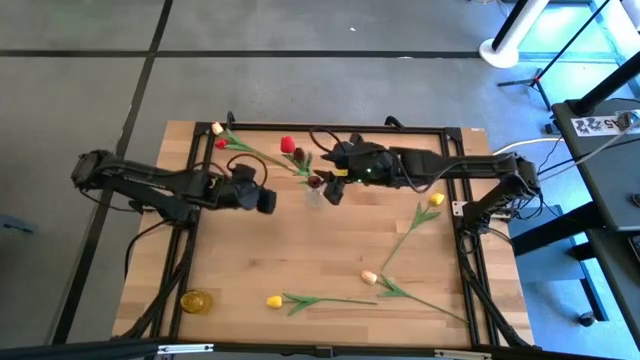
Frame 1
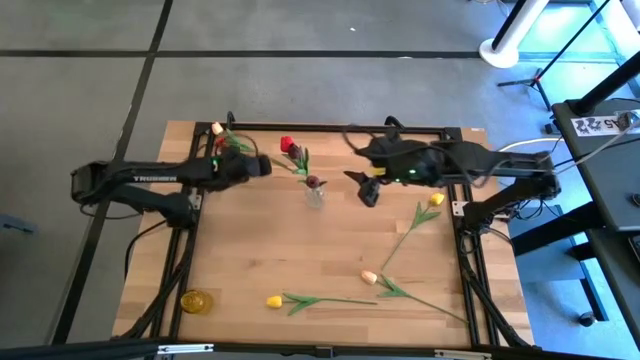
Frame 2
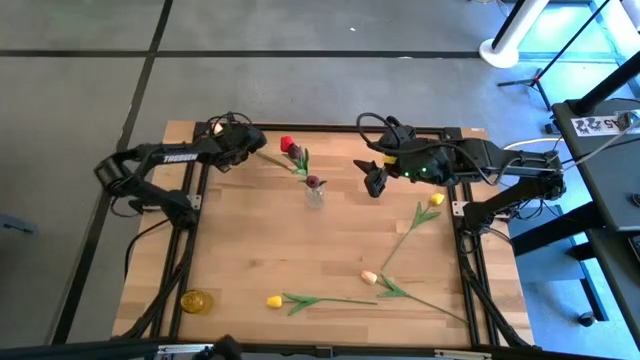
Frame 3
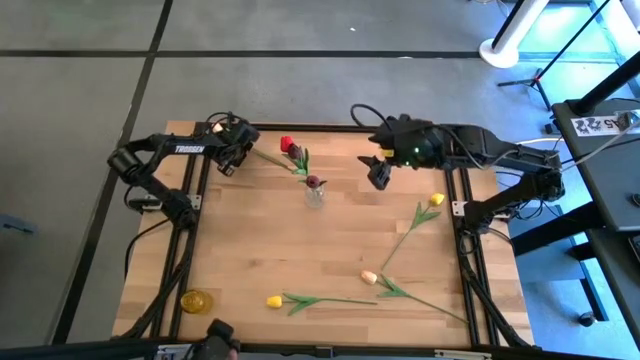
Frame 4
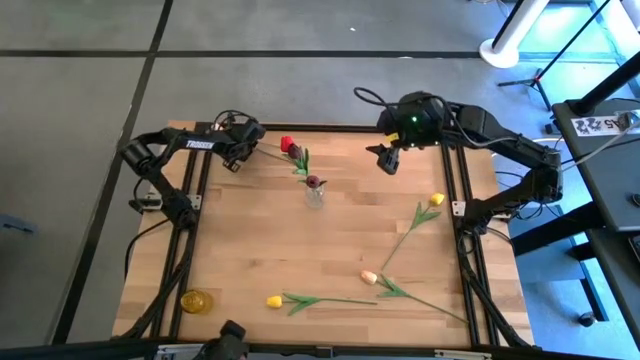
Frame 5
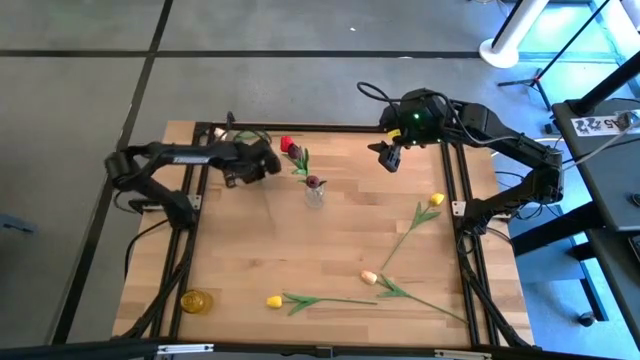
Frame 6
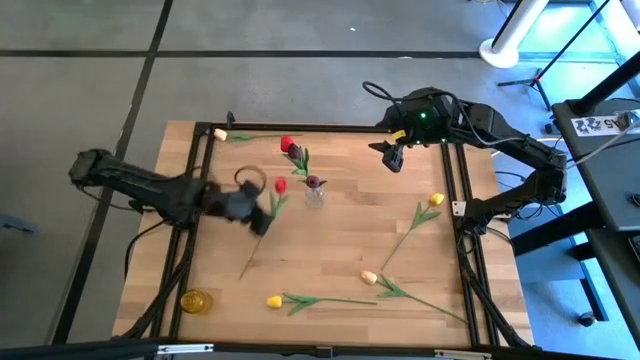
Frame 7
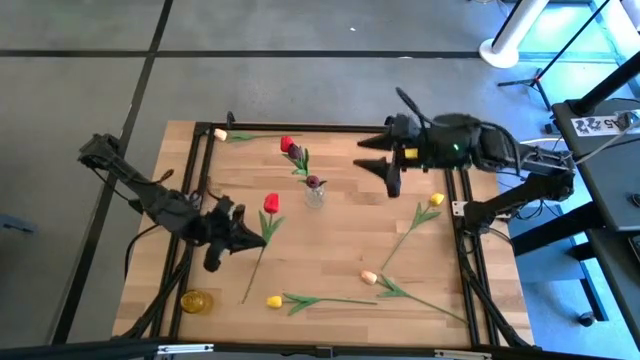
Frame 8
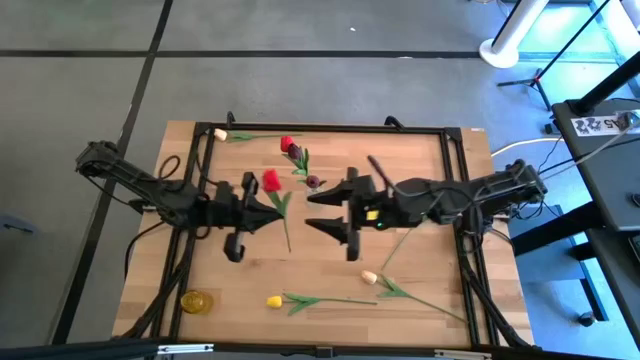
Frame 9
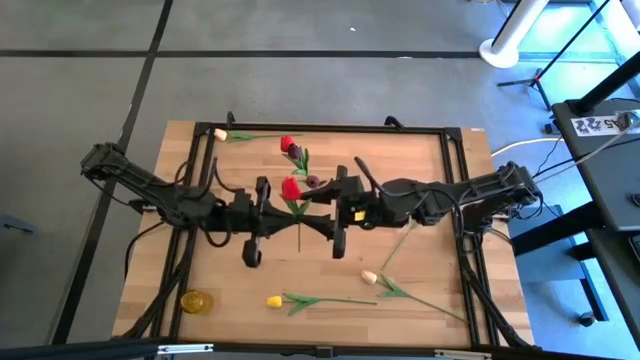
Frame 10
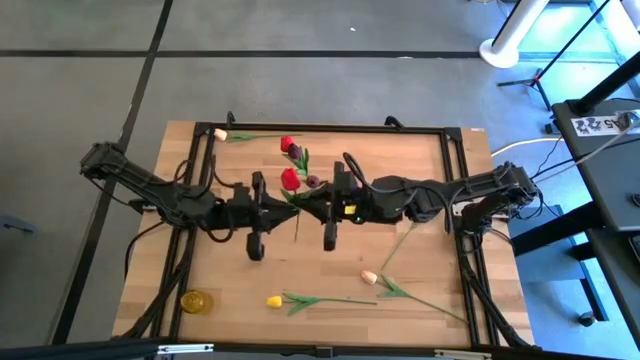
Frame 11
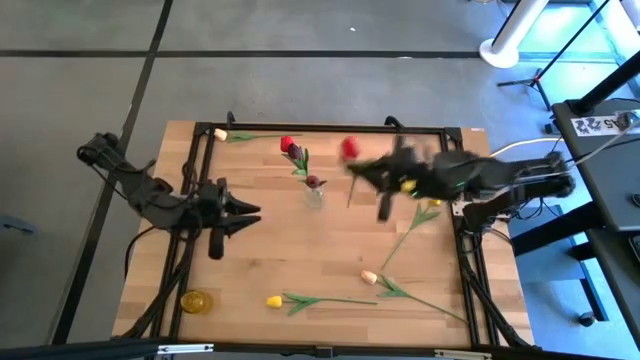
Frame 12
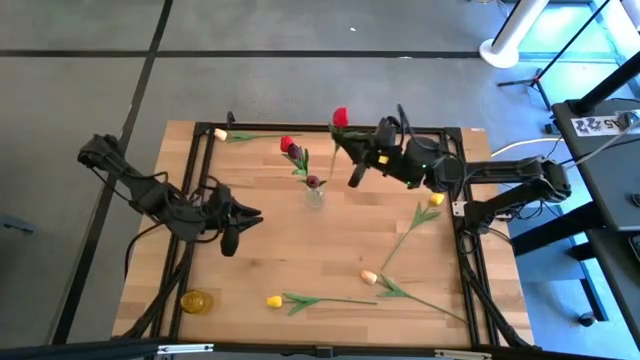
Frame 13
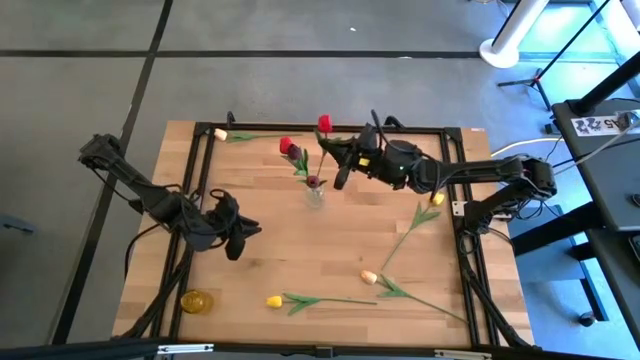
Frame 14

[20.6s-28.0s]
Task: Sort flowers into vase by color
Put the red flower into the transparent vase

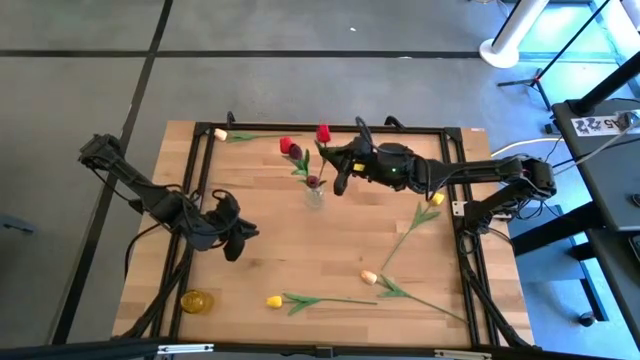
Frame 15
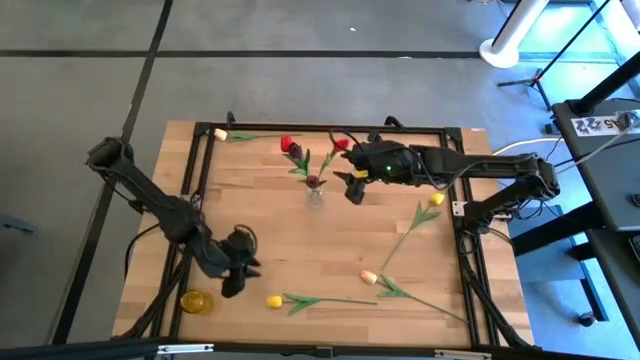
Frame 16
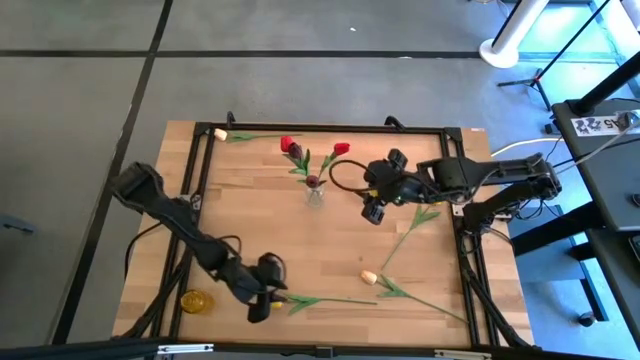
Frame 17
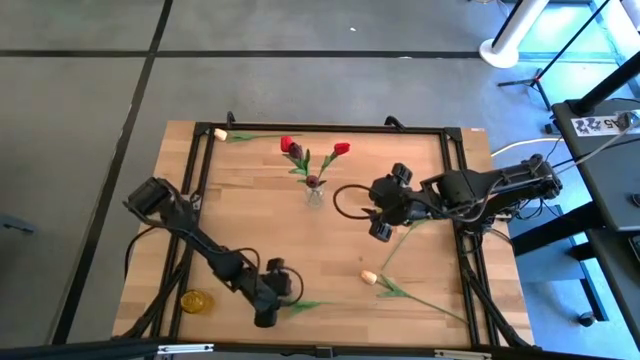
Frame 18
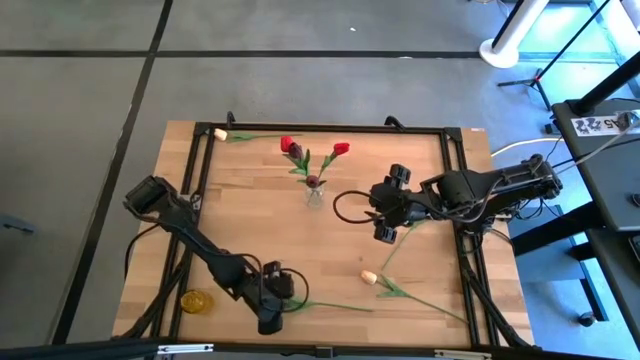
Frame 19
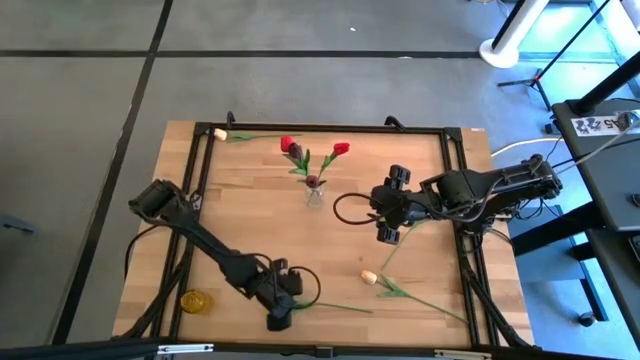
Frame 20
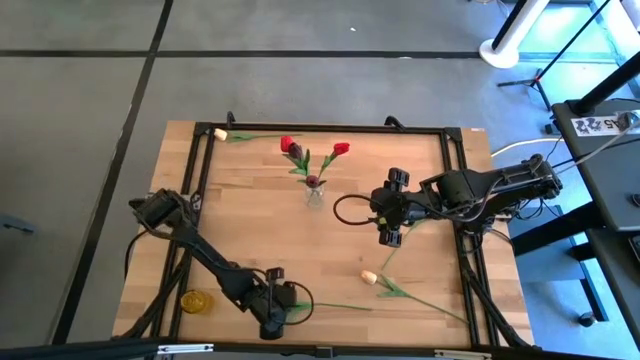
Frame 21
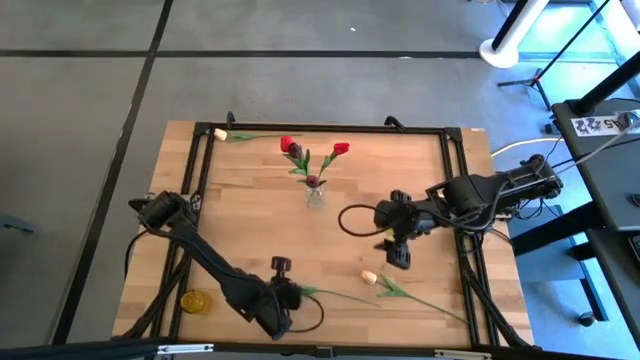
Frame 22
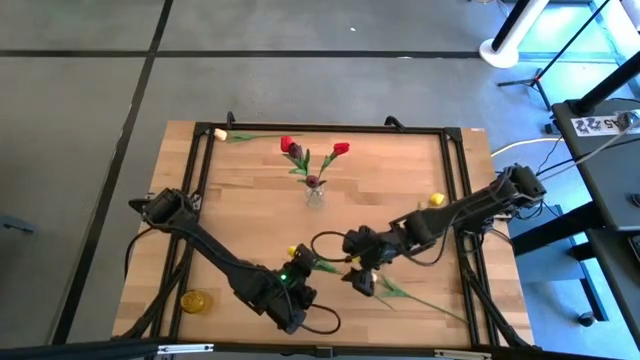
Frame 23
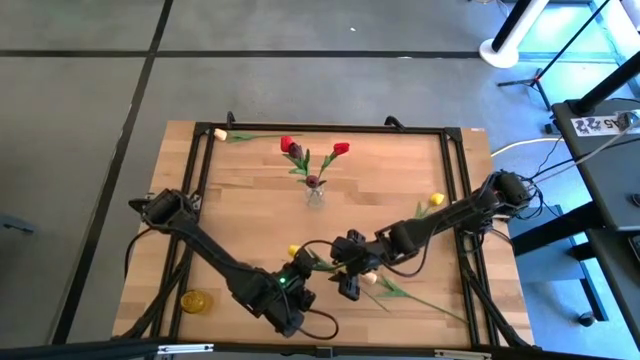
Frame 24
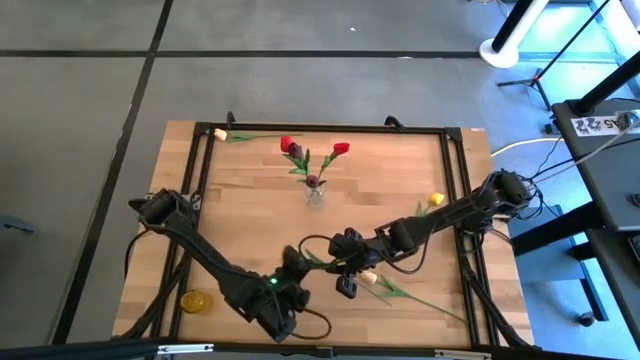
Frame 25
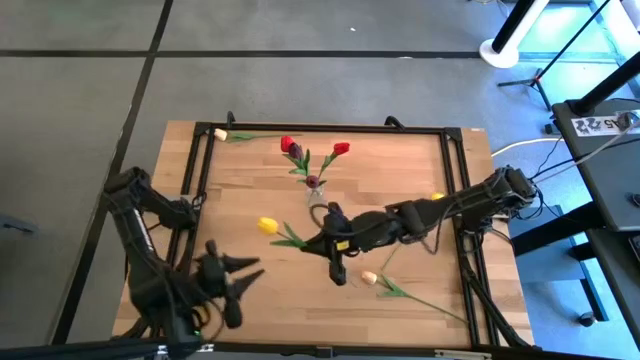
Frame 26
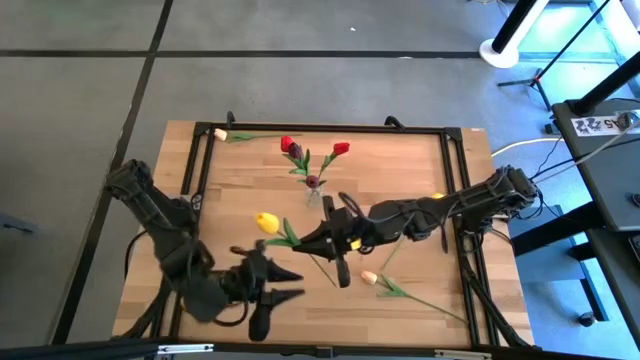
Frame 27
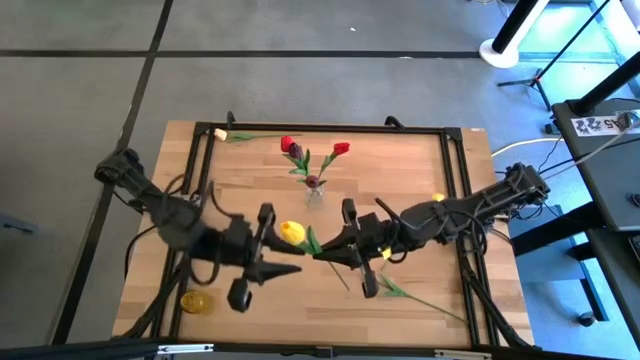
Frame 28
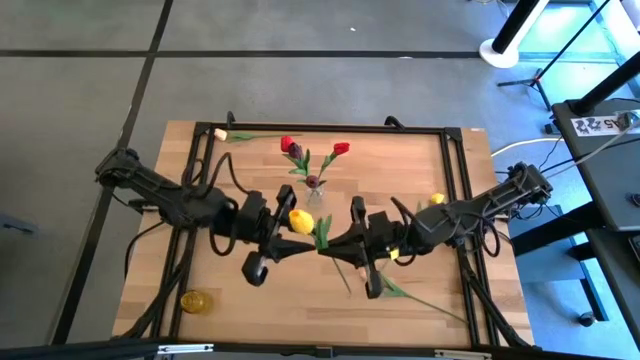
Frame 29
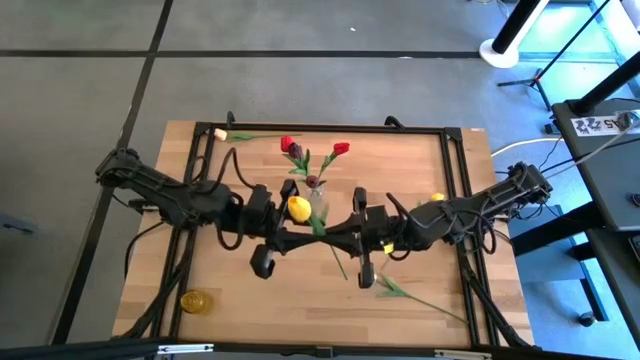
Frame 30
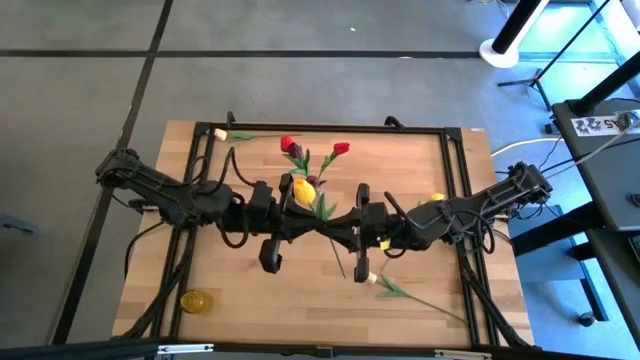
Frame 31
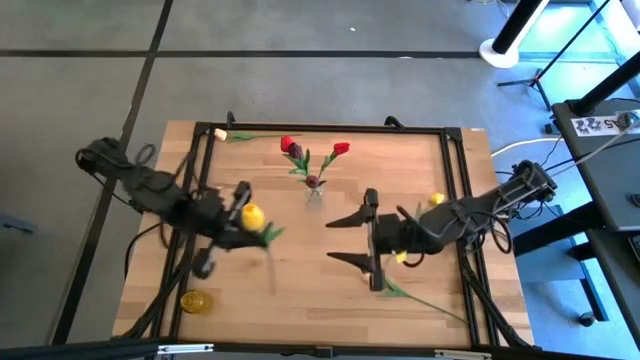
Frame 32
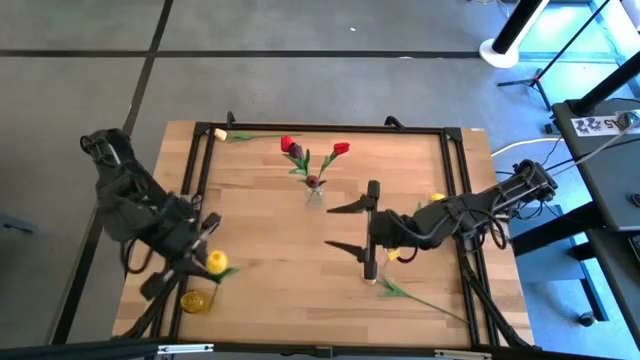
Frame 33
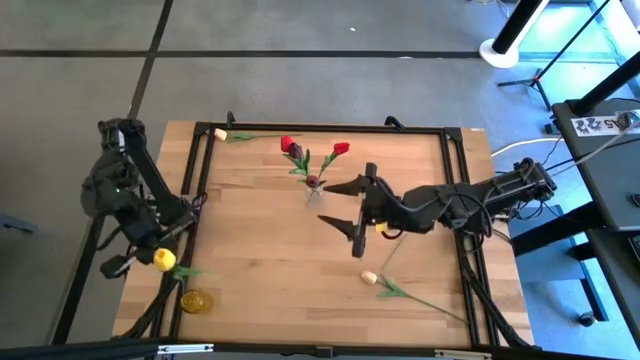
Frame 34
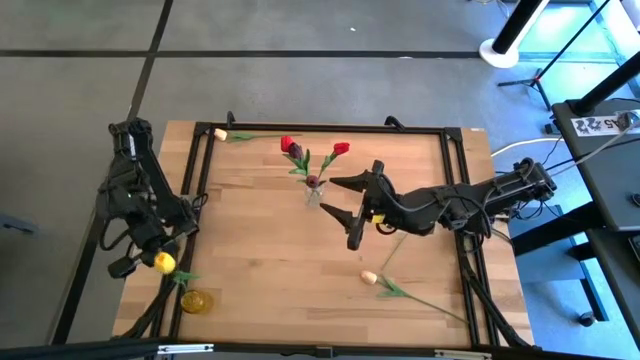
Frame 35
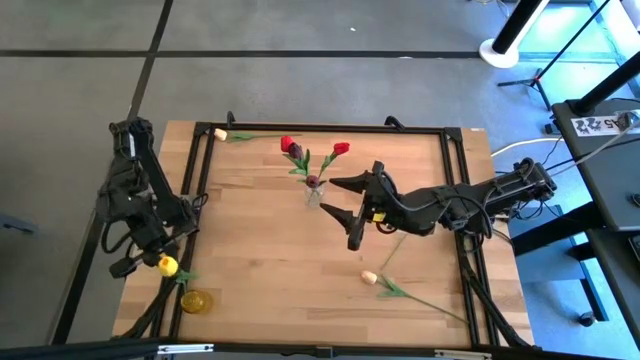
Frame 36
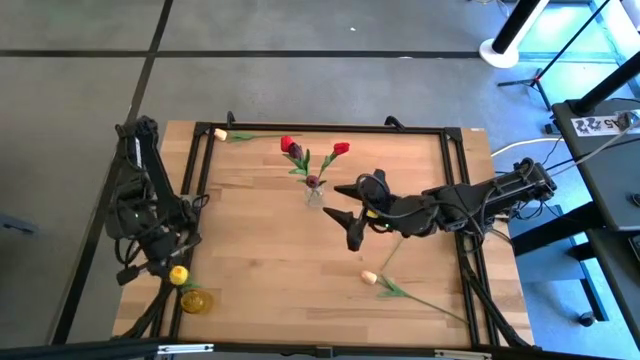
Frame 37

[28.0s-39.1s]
Put the bottom yellow flower into the yellow vase

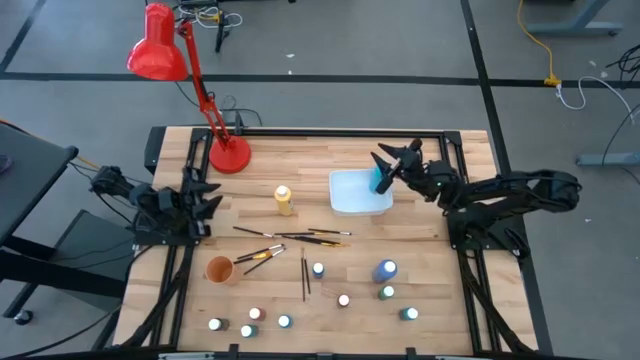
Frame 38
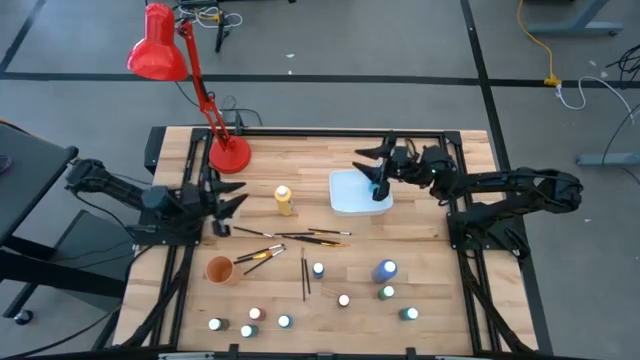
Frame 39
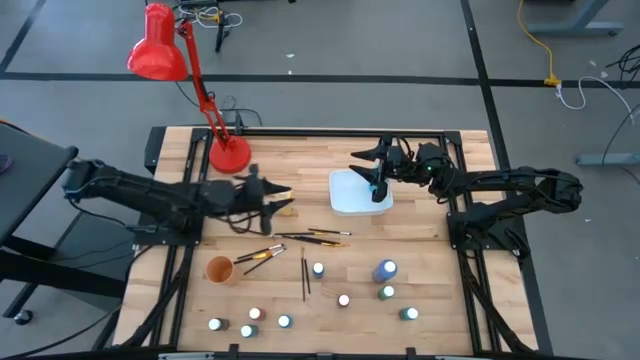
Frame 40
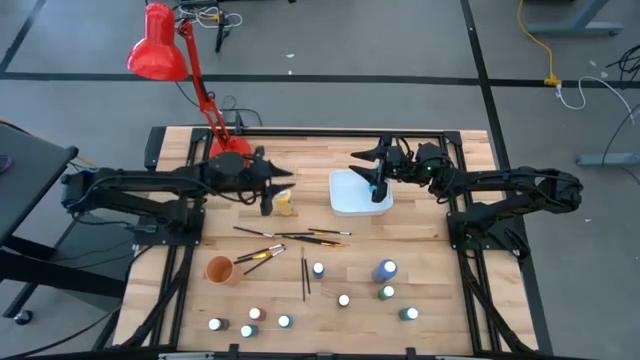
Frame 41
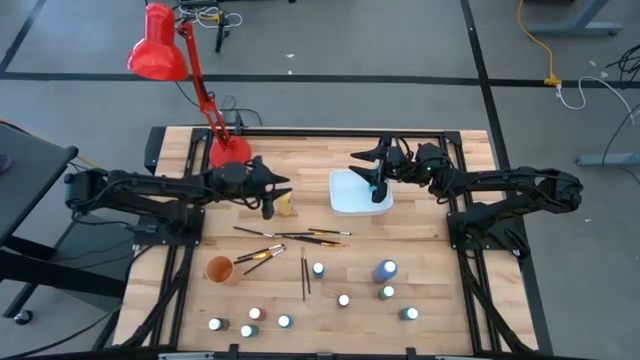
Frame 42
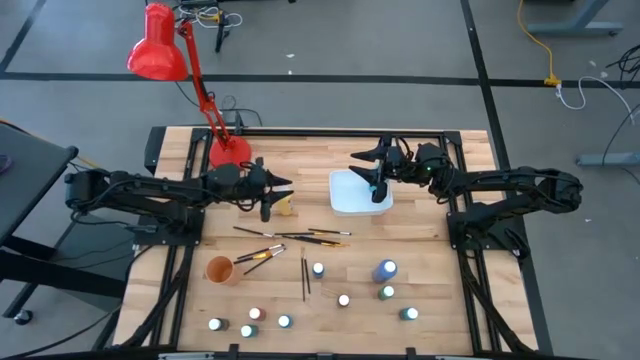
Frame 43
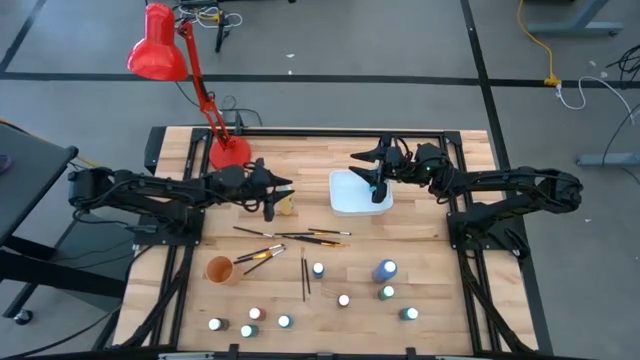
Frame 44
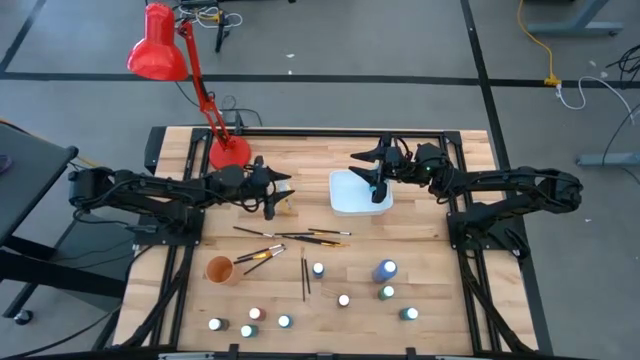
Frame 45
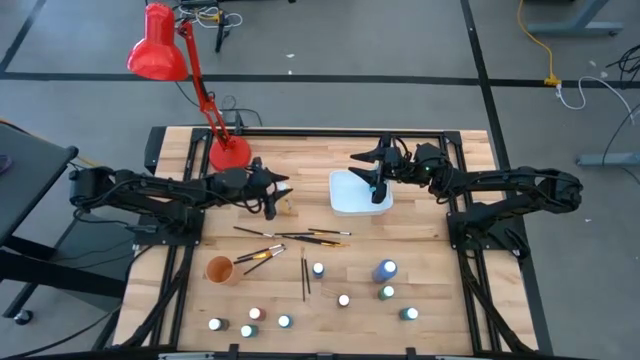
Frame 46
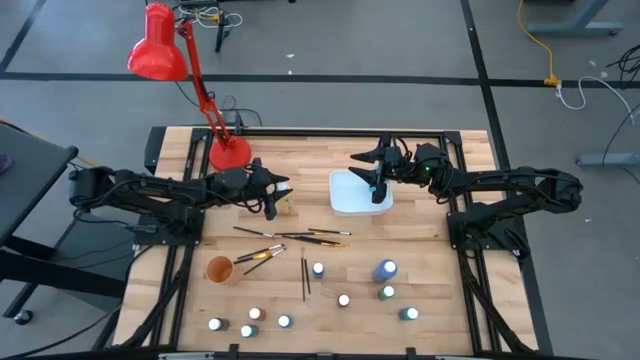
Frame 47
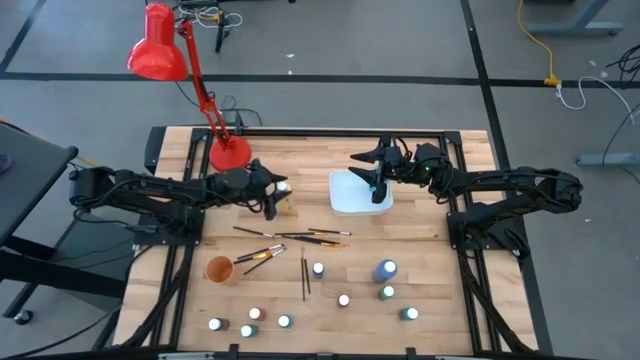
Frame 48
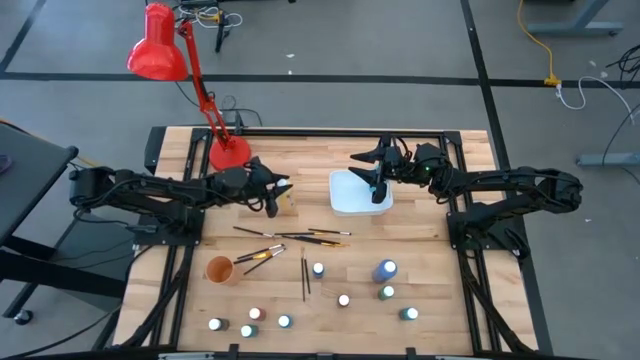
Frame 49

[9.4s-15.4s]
Task: Pick & Place Paint Supplies
Put the large yellow paint bottle into the white bin
